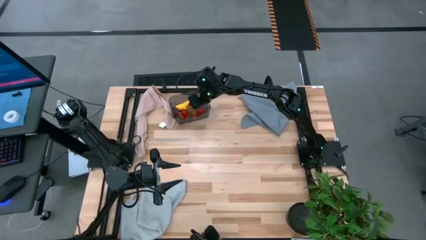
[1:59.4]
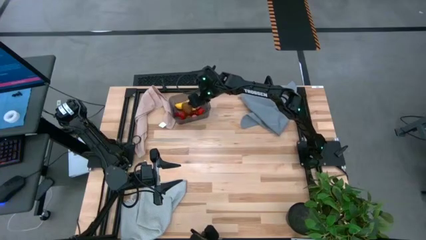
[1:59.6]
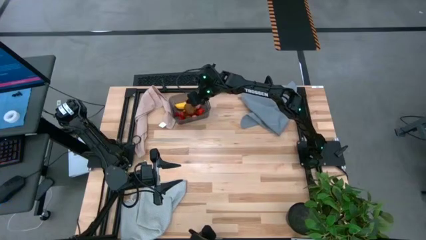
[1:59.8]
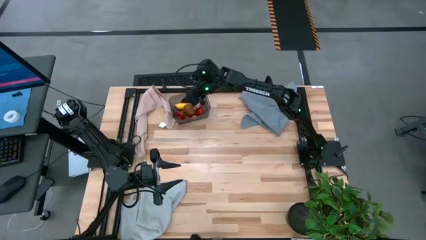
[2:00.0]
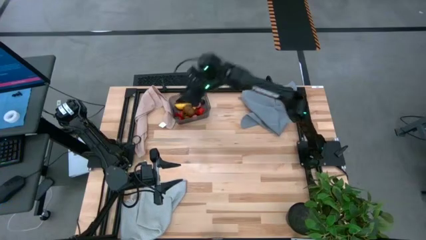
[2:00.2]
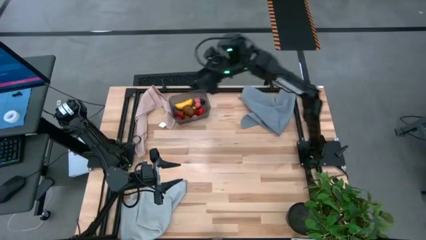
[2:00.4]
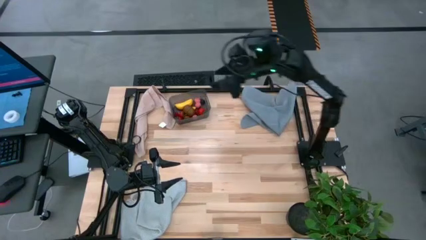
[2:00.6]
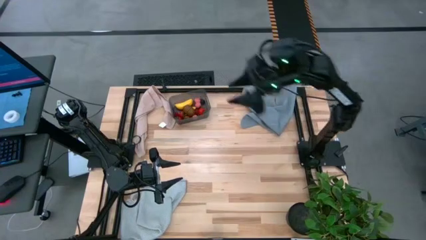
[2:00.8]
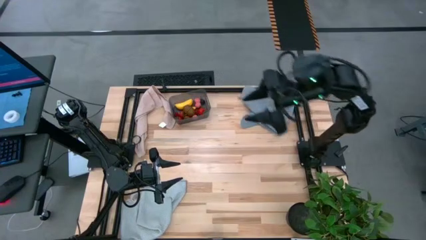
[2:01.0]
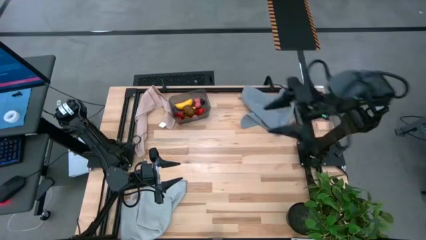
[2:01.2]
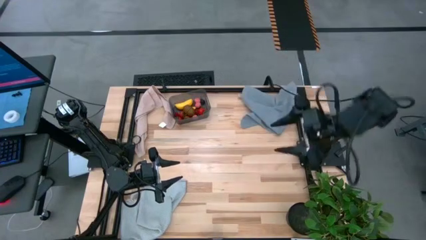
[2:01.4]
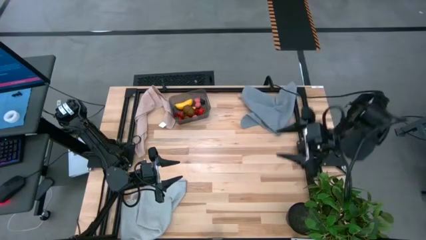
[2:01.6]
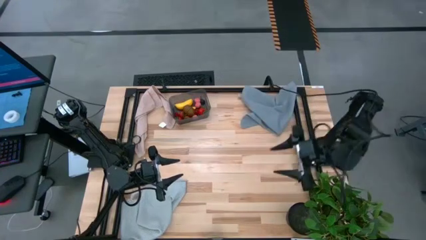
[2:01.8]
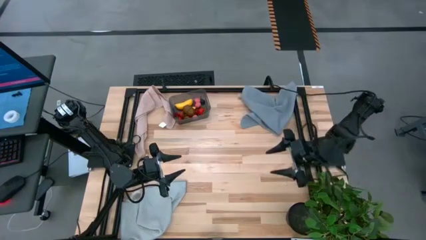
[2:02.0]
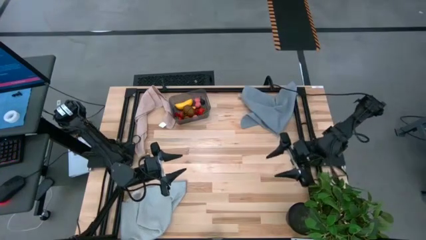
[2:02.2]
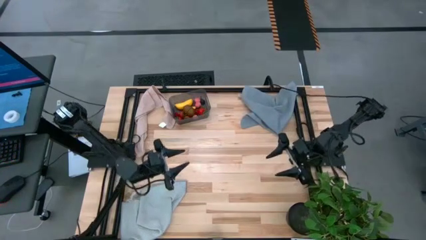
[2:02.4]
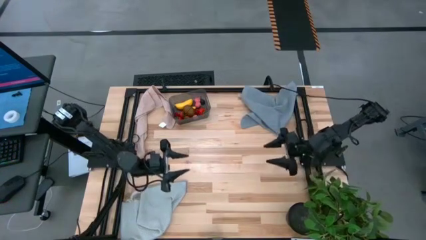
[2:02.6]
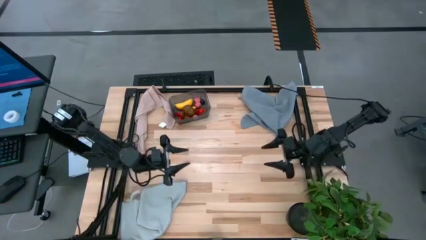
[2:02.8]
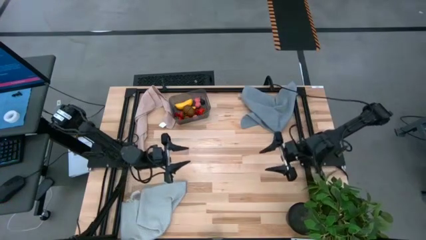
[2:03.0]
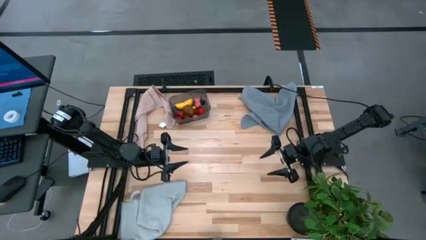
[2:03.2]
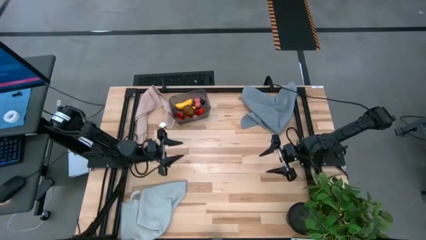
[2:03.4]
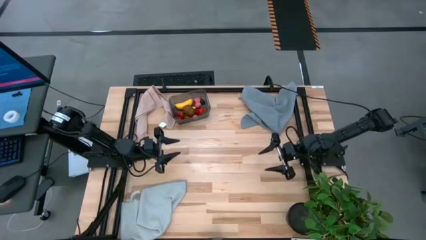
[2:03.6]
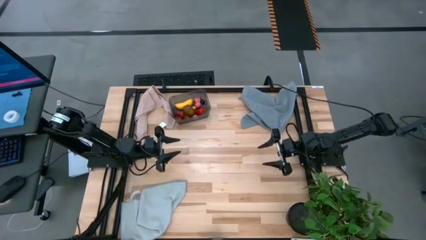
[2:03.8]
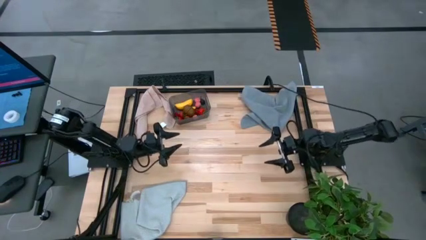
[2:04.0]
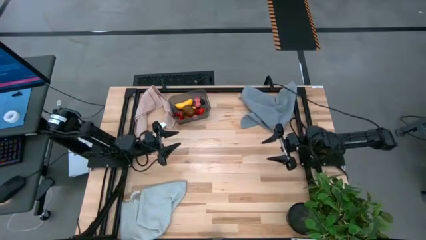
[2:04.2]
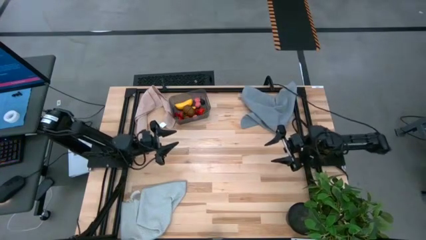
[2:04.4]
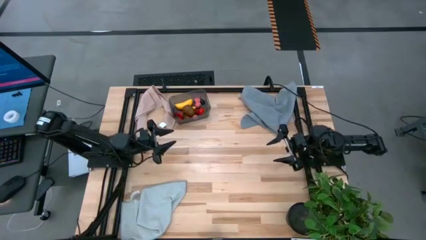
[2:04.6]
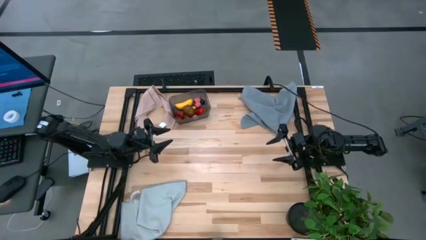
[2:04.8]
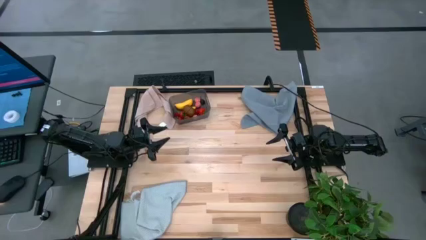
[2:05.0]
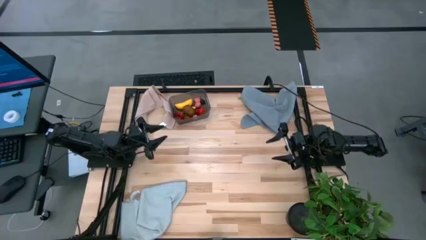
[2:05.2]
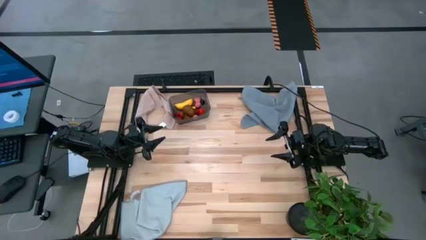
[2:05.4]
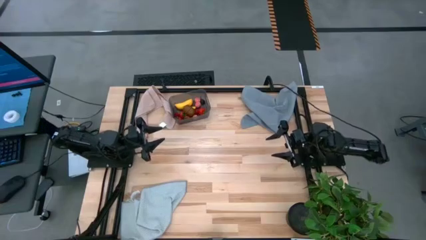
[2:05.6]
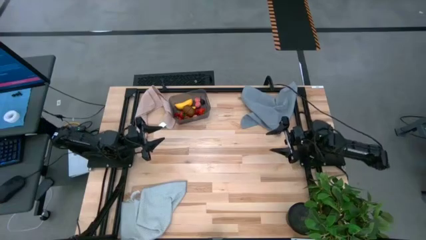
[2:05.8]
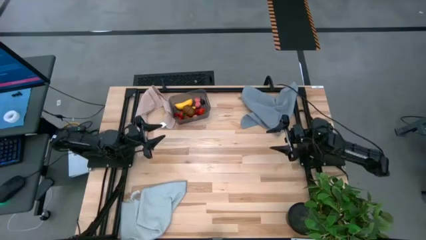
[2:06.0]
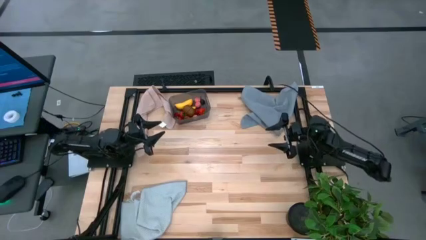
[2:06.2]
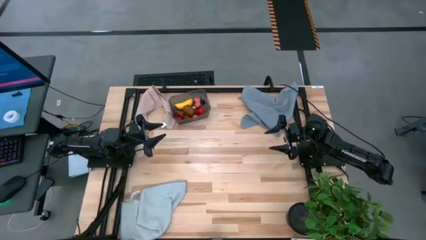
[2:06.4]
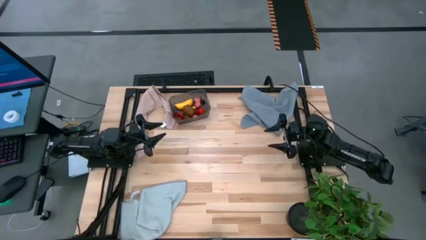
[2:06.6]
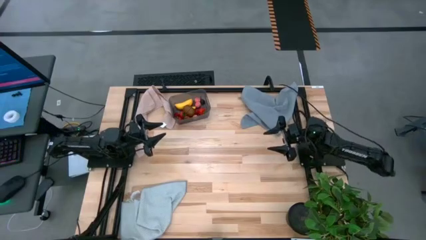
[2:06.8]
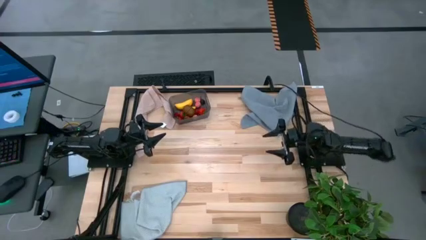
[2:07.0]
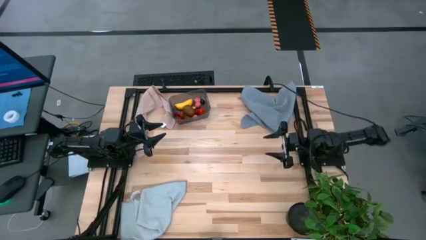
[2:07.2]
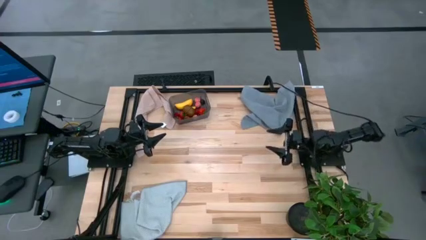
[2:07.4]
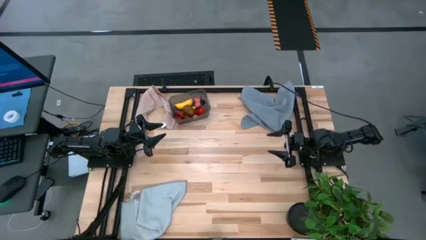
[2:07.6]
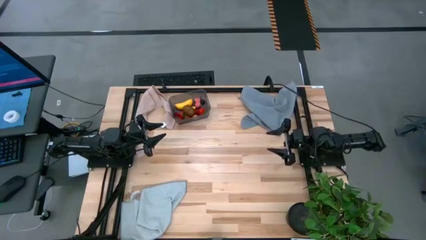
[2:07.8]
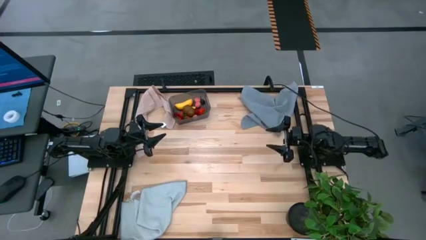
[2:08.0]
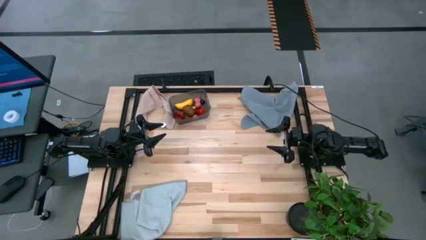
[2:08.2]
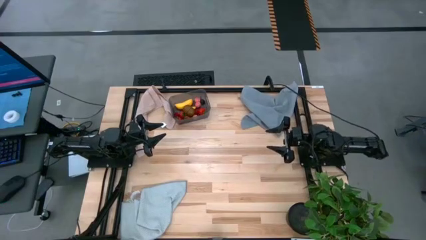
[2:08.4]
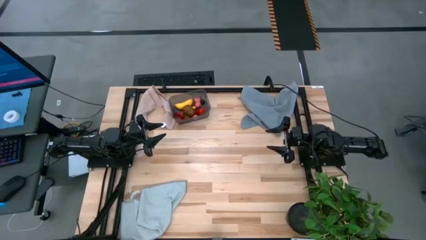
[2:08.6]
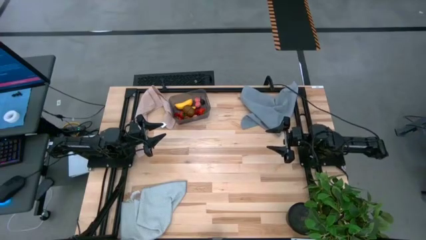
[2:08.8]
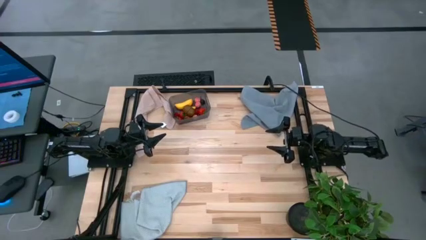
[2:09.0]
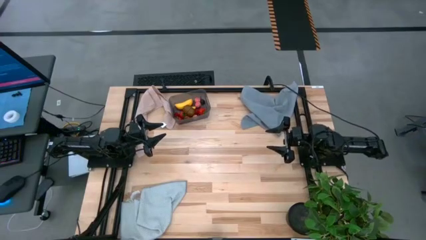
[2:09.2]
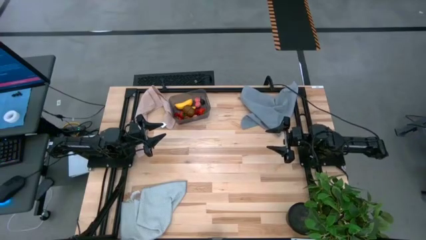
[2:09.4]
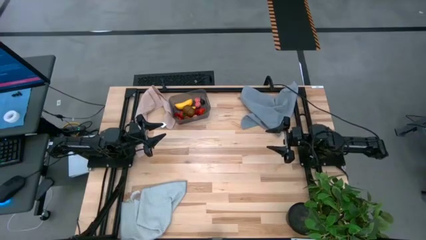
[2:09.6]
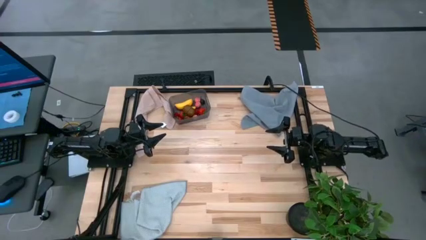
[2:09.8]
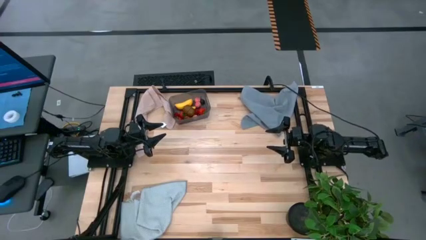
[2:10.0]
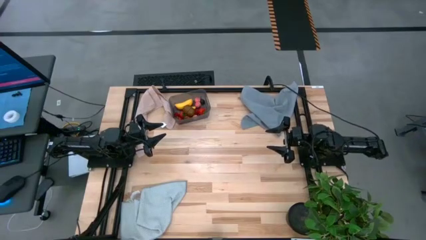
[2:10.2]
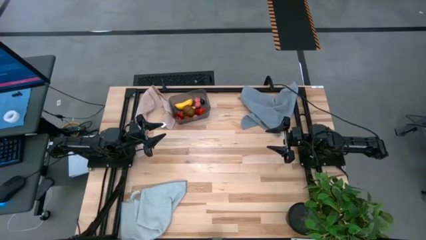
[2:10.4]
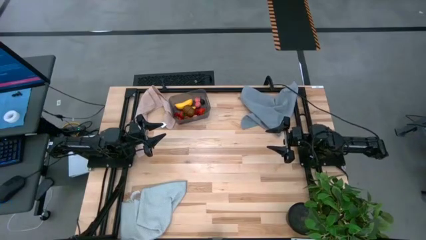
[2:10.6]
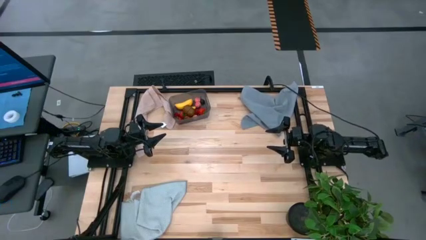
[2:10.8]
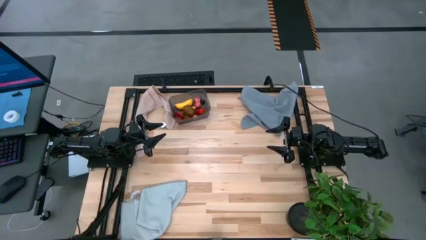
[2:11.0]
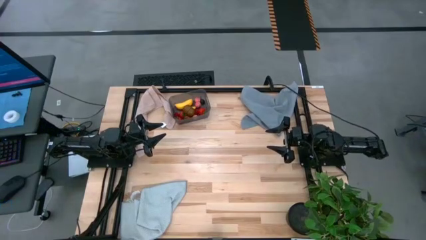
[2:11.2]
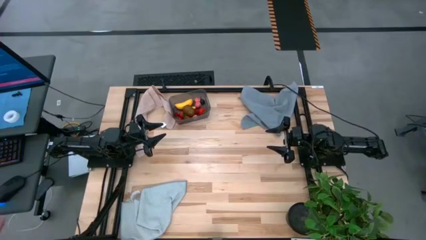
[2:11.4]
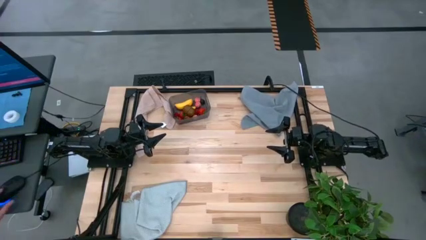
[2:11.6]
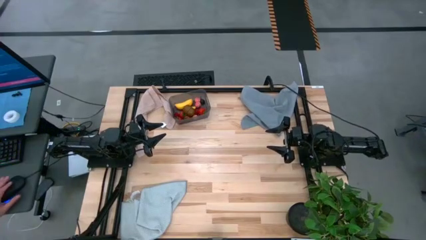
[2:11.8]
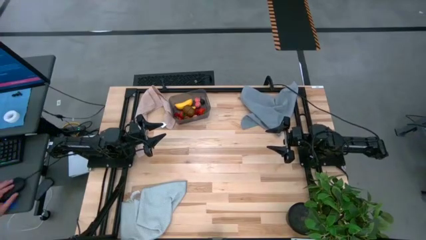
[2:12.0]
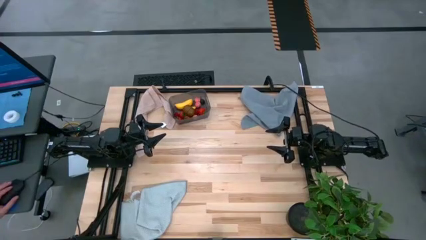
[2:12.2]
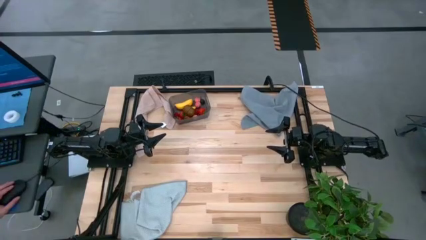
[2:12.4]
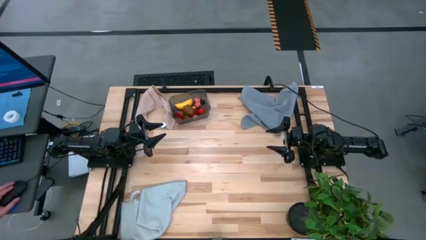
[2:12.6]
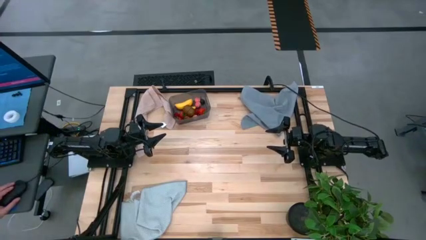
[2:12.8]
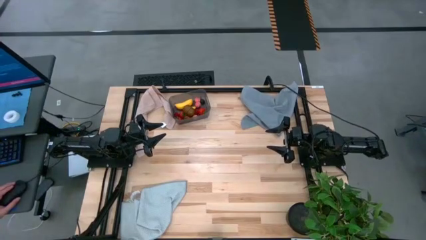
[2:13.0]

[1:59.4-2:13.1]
Task: Pick and placing Produce into tupperware
Return to Home Position

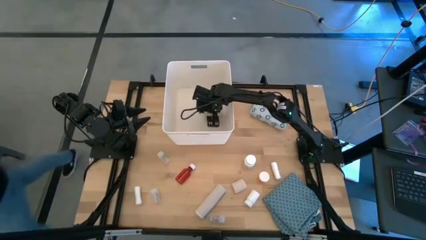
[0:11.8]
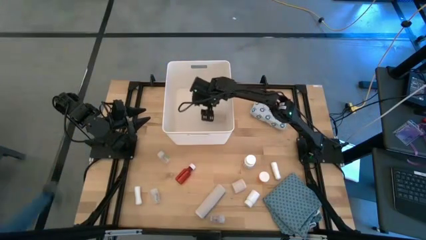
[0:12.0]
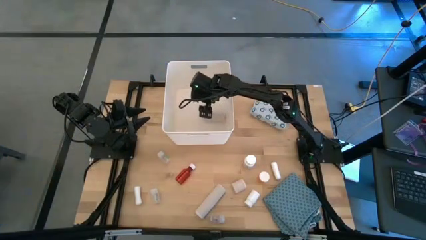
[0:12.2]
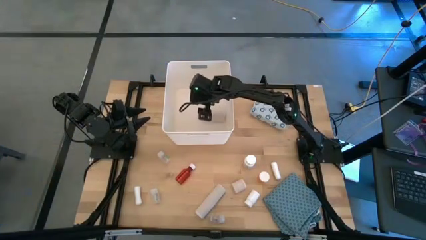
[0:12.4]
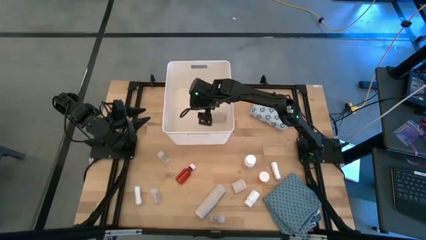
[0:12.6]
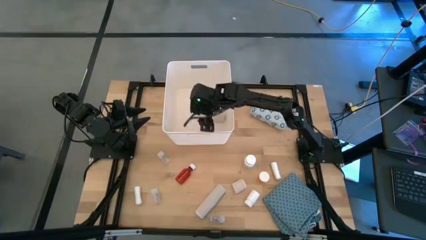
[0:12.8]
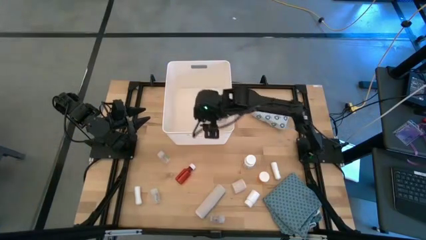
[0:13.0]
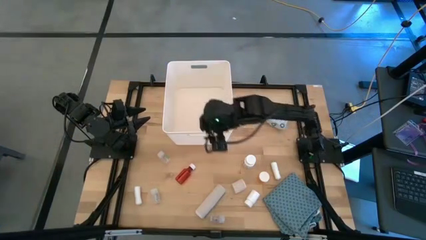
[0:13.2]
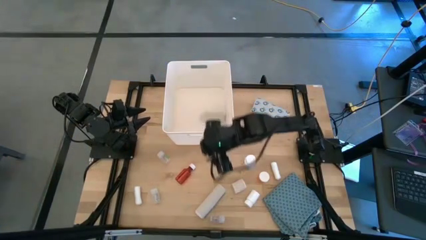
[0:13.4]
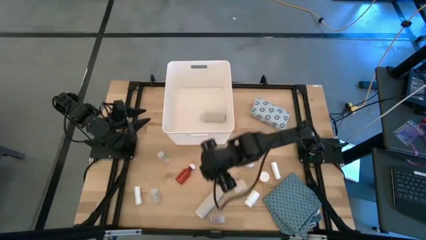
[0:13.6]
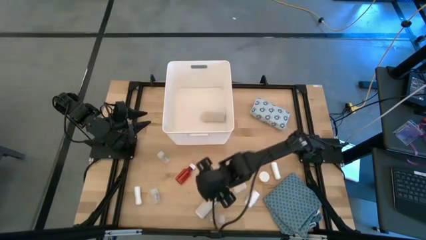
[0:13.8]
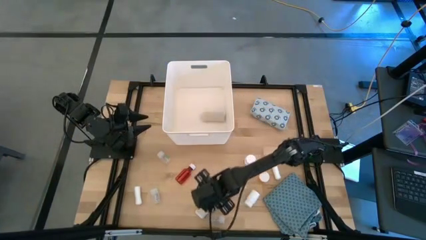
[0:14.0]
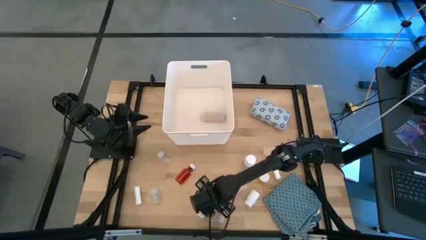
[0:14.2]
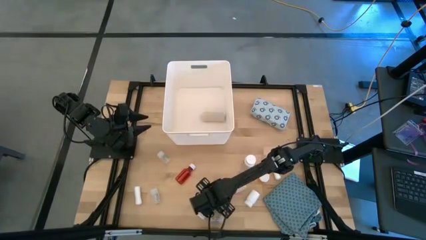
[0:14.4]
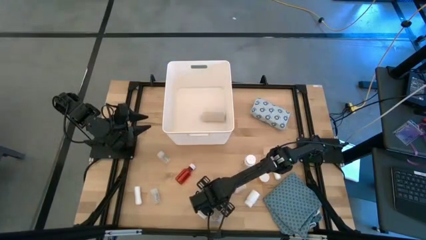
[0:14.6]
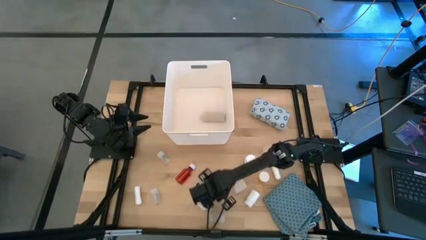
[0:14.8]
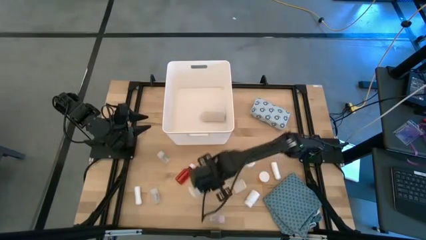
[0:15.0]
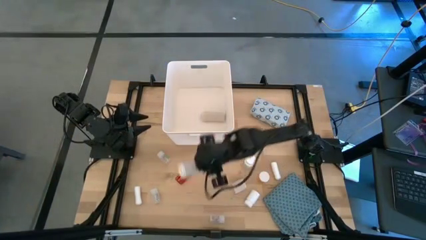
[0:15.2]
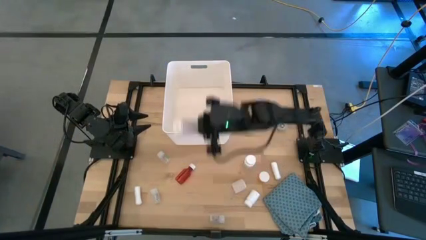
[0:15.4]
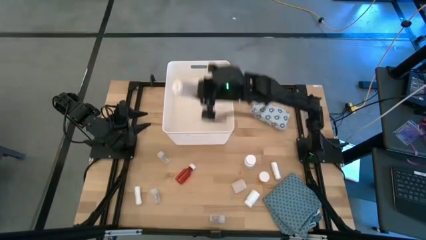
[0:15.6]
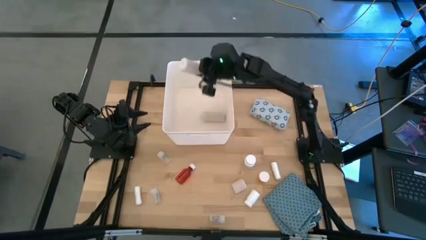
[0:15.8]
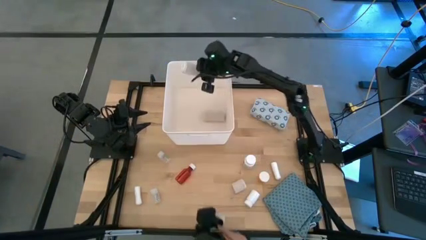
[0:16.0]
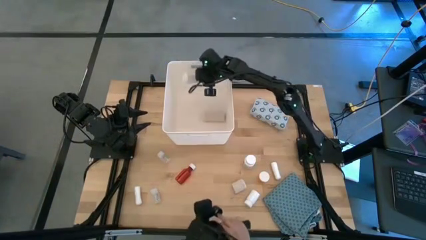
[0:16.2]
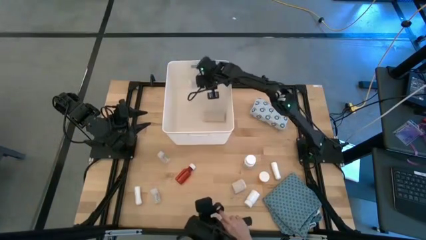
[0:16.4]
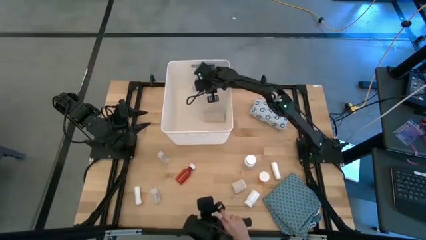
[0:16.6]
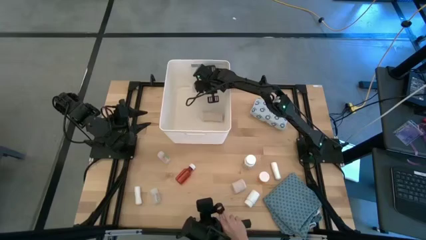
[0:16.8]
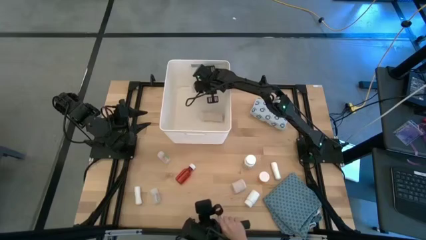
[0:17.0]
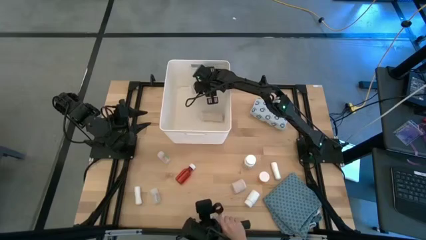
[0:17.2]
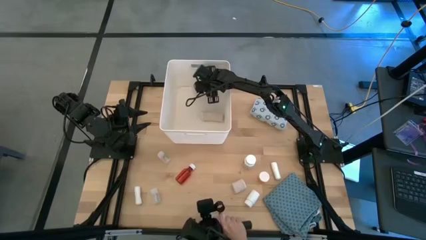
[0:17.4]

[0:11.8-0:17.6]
Task: Pick & place medical supplies in basket/bin
Put the white bandage into the white bin
